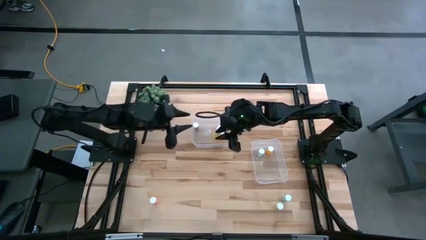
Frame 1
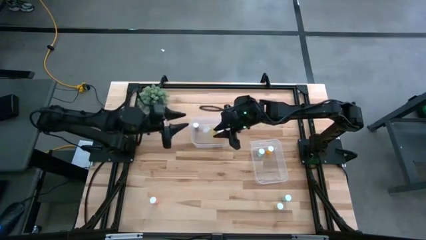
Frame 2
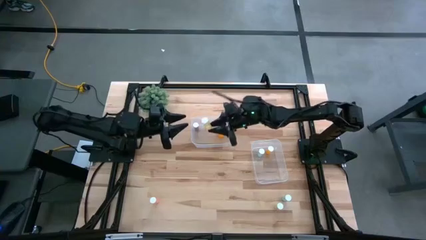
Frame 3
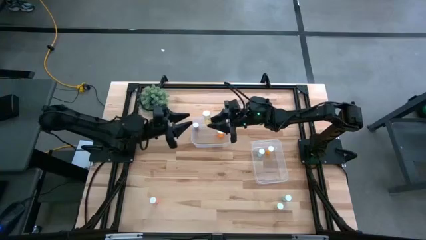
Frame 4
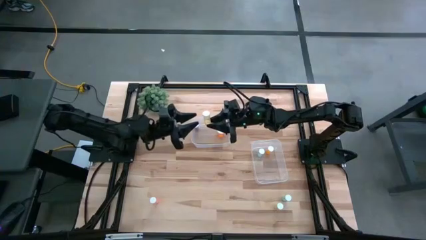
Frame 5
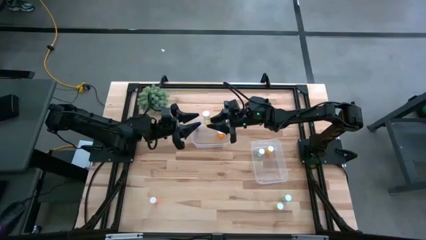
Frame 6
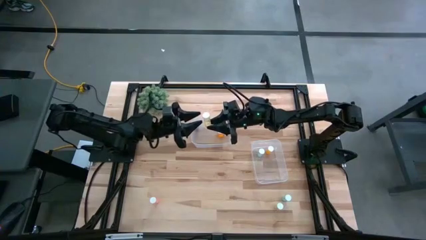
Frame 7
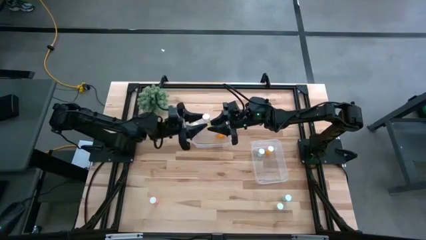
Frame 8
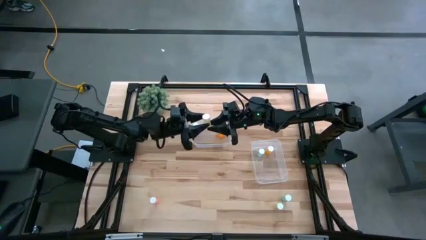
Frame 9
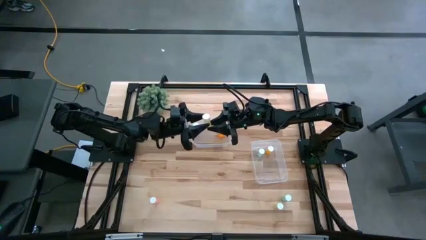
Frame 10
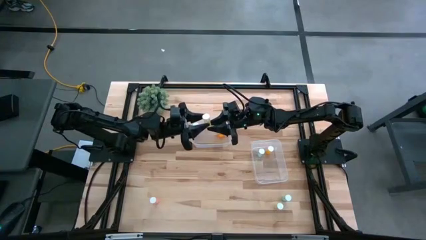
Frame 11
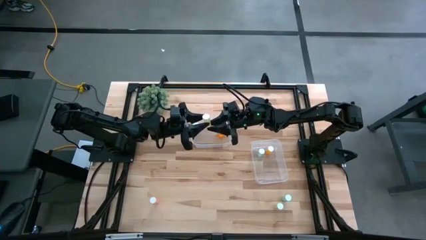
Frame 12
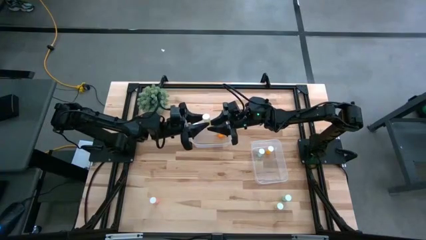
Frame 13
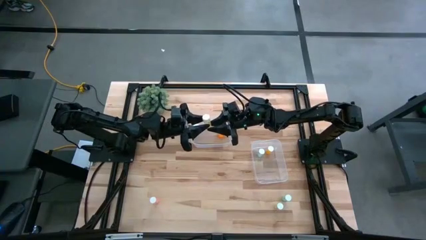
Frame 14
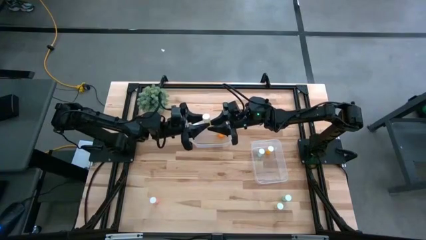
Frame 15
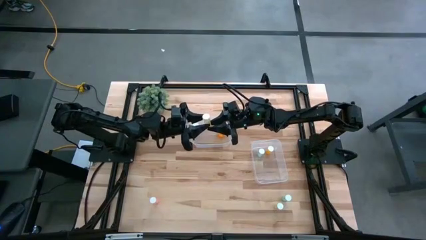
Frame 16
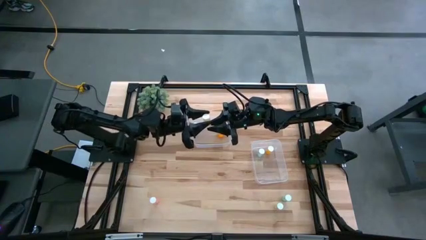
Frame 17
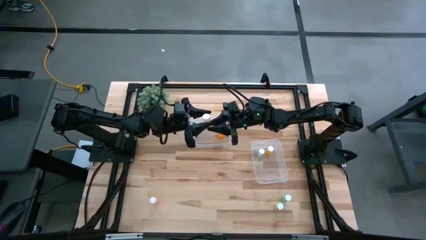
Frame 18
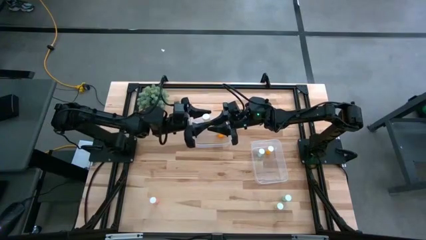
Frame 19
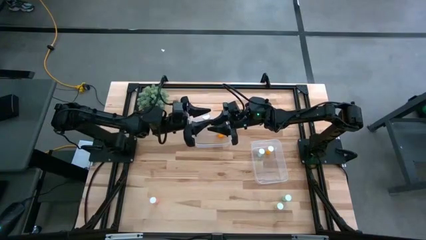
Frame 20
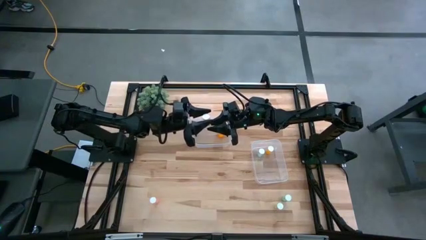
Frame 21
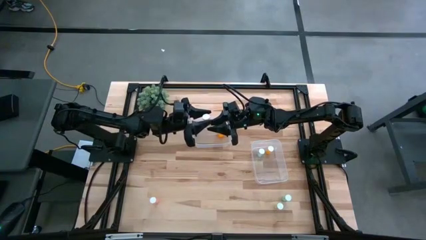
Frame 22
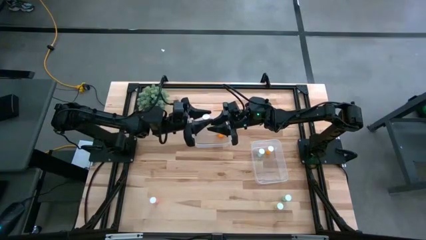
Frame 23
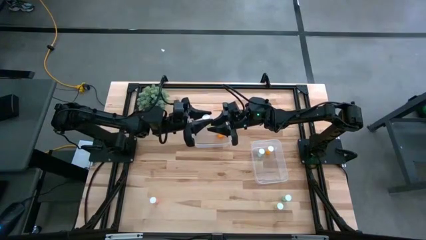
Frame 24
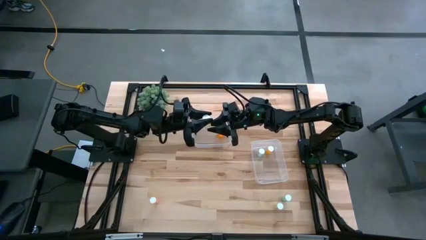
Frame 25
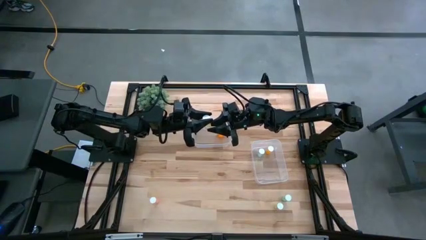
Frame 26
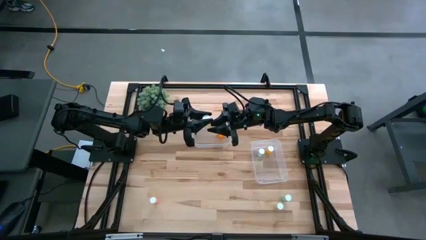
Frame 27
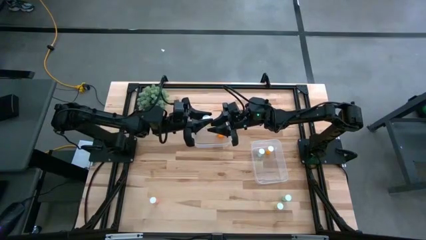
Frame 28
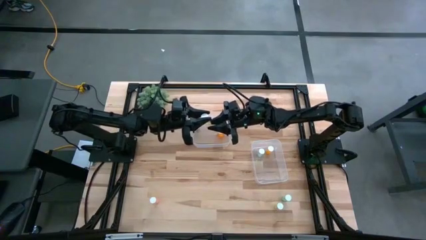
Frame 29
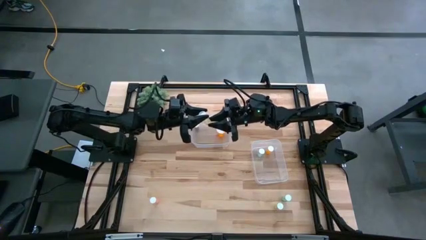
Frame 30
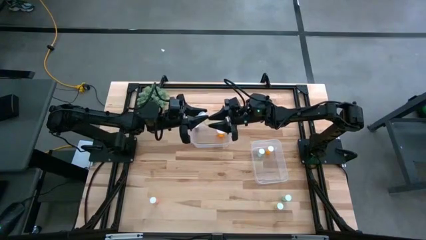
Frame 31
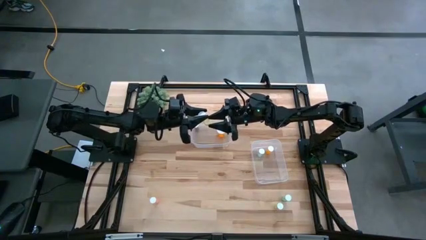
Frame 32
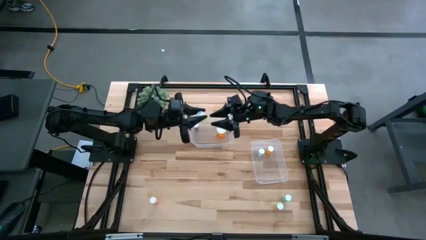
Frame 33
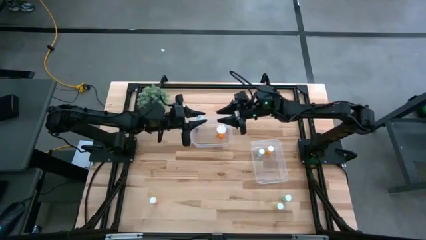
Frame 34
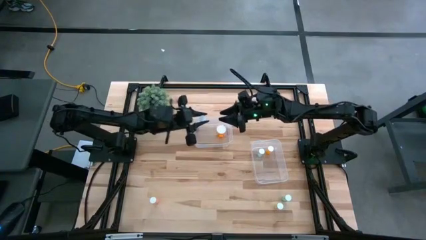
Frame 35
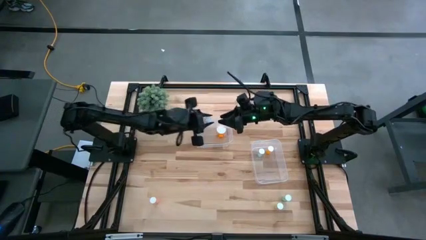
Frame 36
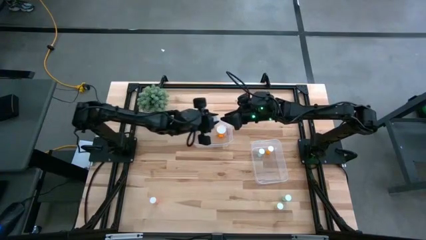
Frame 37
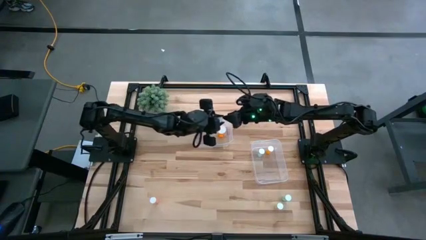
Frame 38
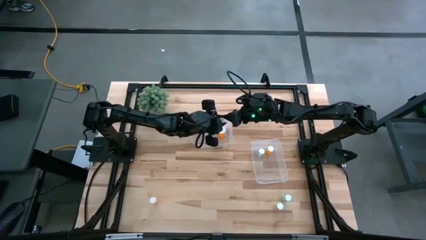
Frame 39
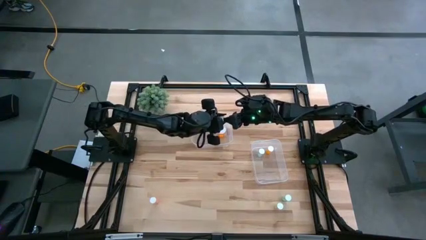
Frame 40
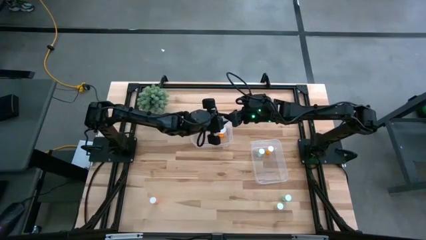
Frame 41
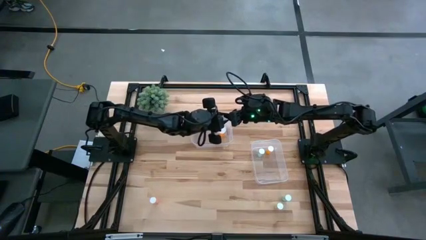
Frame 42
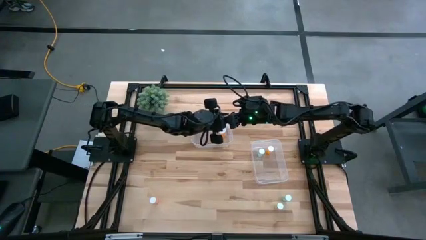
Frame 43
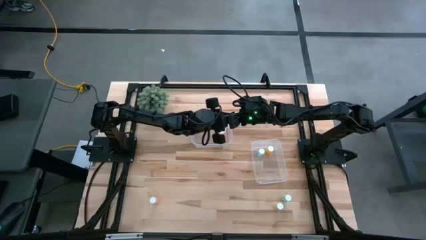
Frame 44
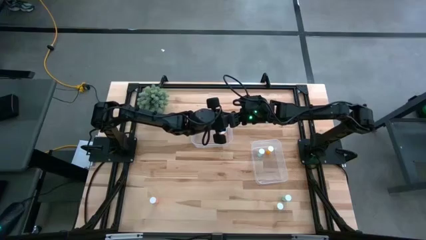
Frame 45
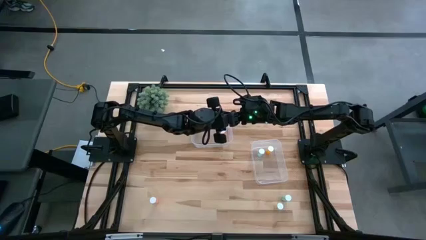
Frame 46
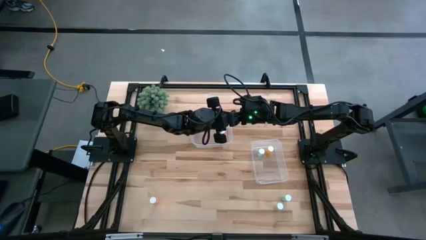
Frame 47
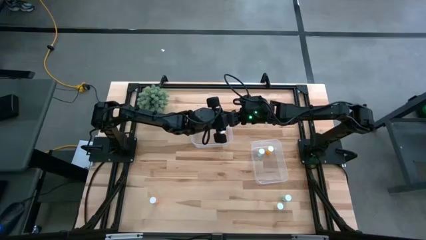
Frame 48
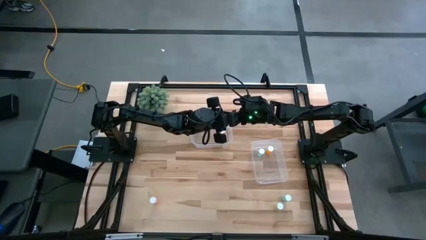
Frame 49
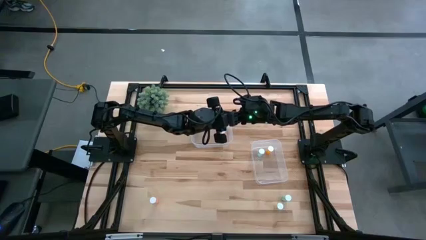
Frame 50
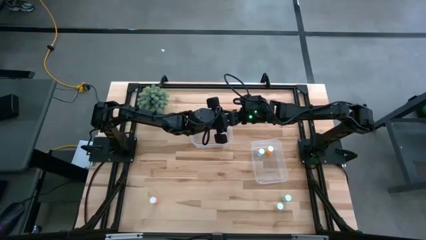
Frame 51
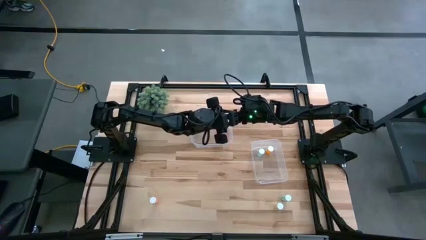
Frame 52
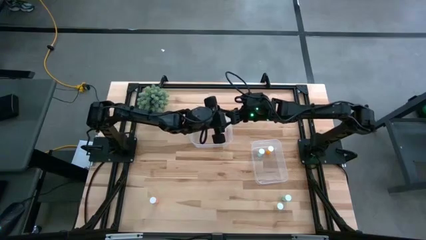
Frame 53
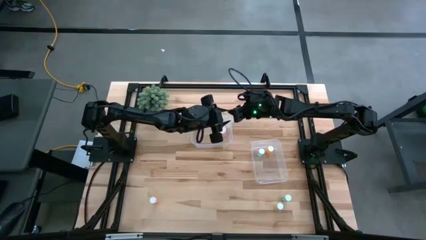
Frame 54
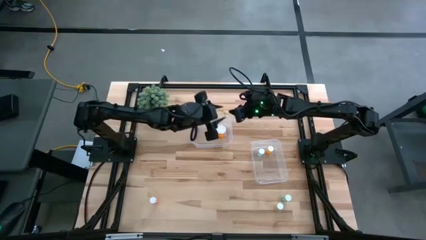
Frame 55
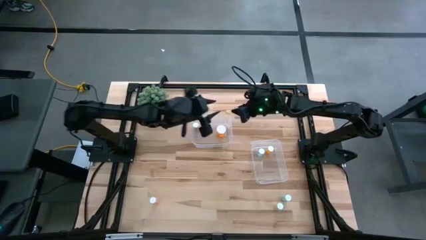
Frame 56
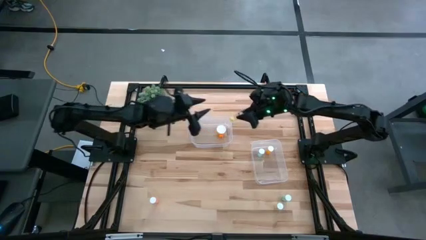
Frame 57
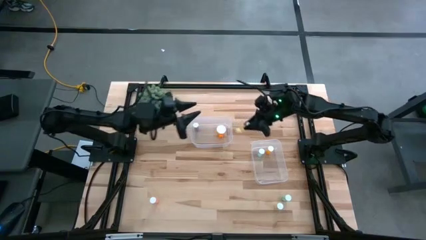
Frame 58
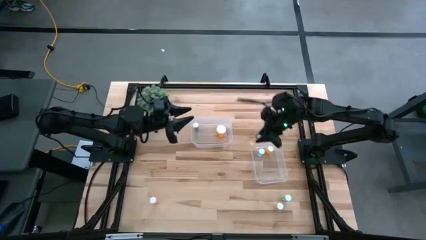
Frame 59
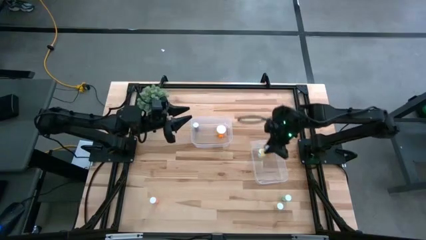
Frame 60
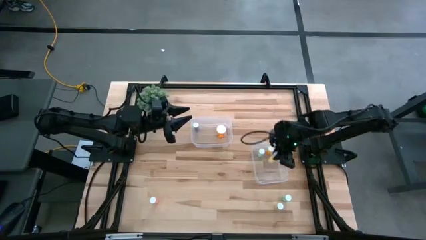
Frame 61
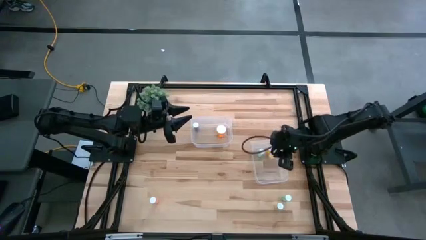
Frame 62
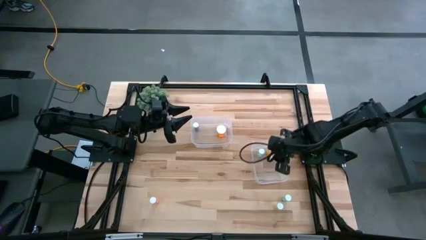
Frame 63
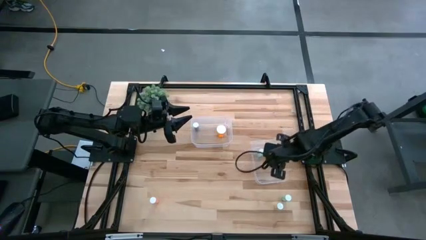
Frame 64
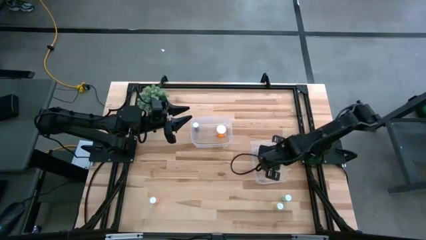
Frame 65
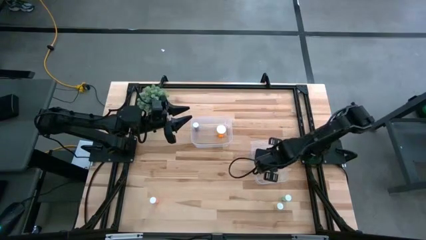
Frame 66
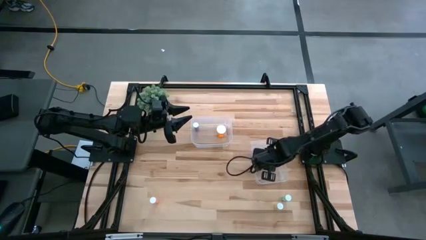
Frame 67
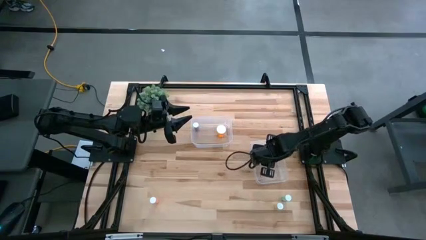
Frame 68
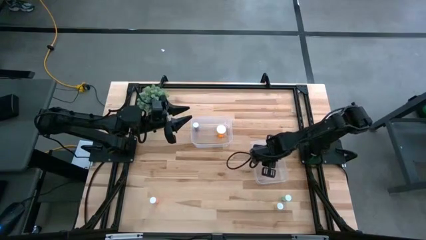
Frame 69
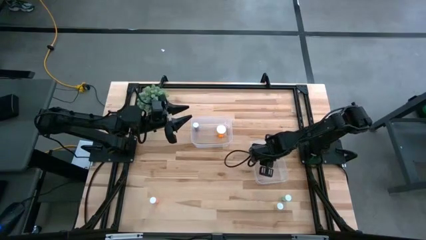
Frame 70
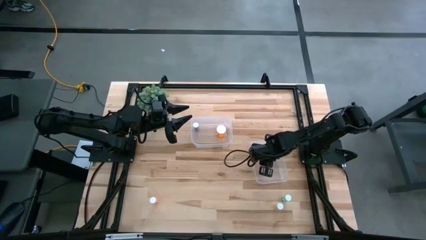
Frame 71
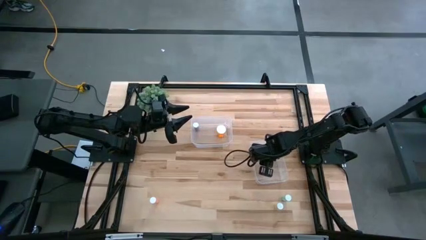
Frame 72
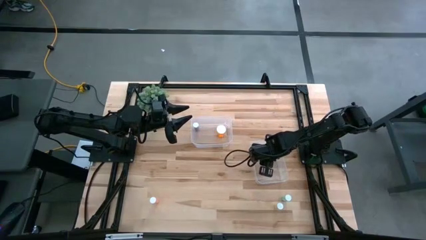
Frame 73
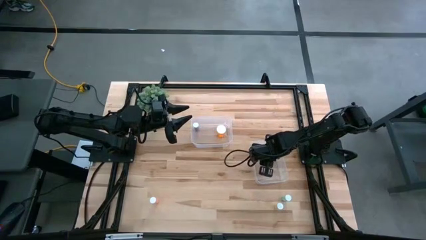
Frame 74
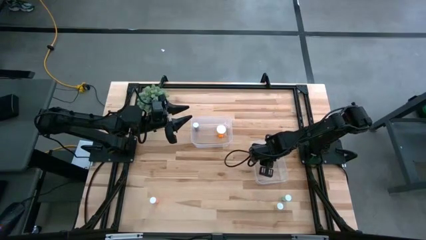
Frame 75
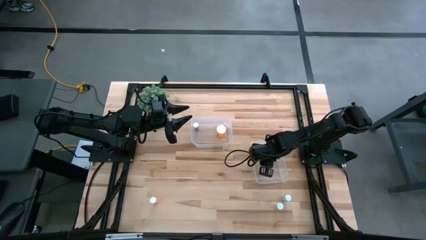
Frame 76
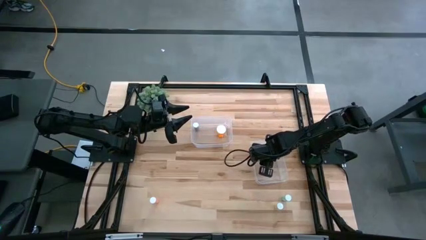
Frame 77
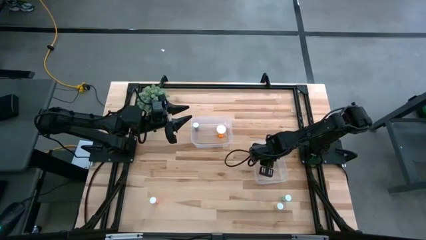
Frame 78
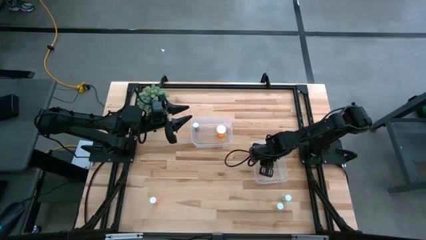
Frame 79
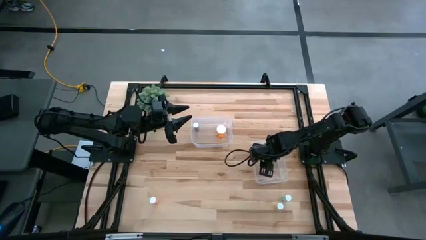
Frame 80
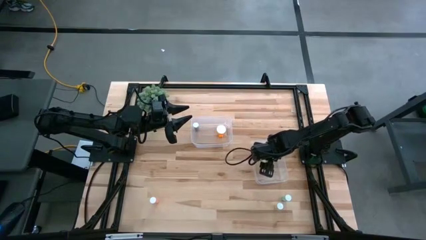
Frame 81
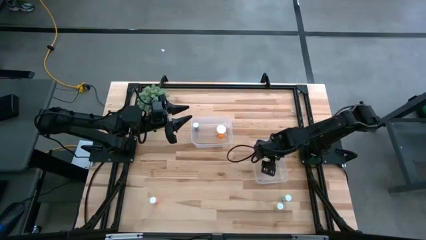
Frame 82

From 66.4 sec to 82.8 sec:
Task: Pick and place medicine bottles into bin by pill shape (circle, oval)
Put the left yellow tablet bottle into the bottom transparent bin
